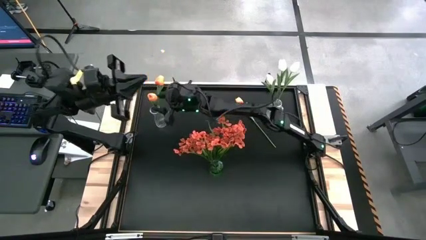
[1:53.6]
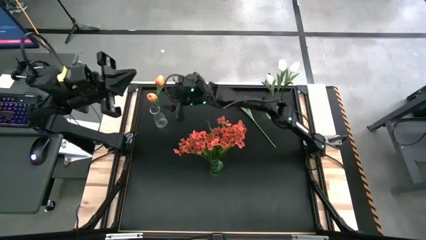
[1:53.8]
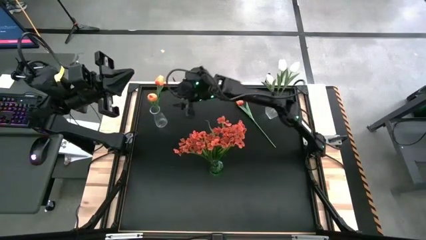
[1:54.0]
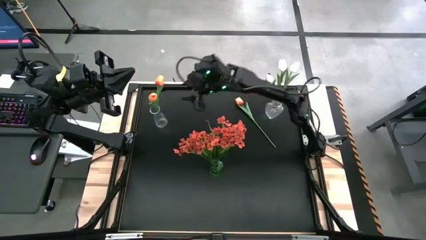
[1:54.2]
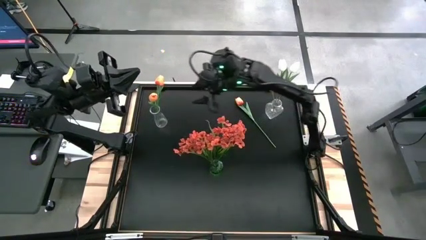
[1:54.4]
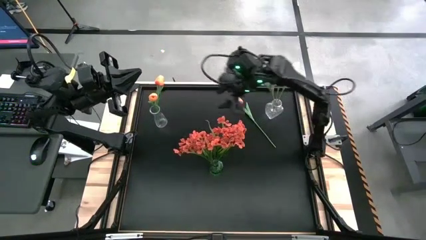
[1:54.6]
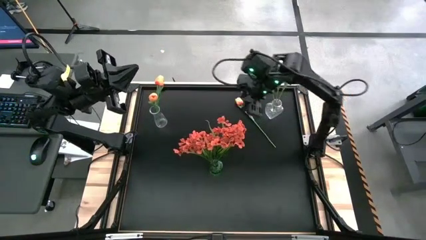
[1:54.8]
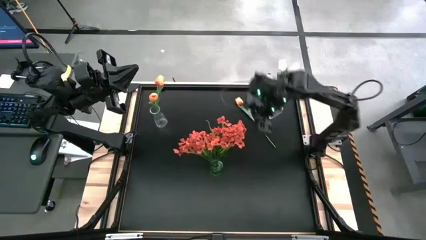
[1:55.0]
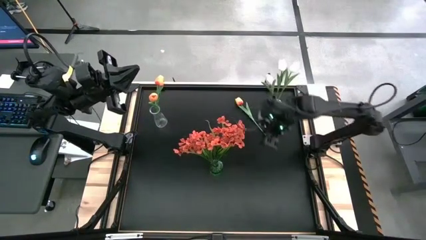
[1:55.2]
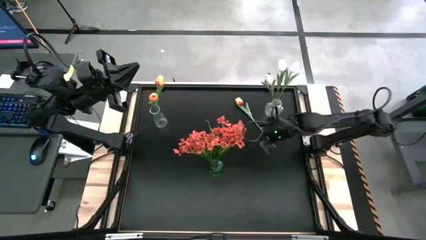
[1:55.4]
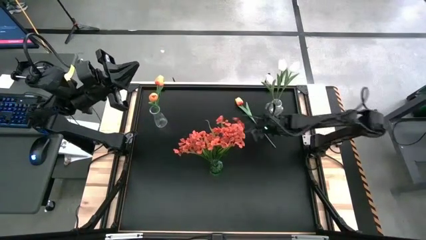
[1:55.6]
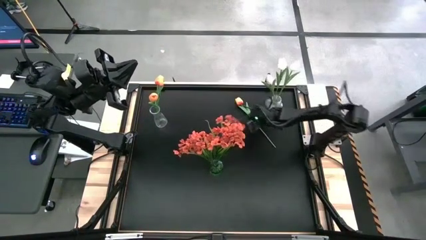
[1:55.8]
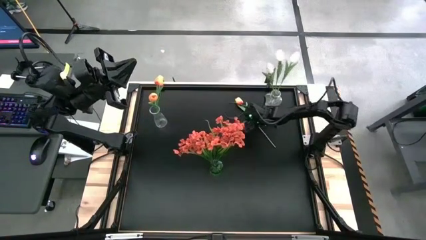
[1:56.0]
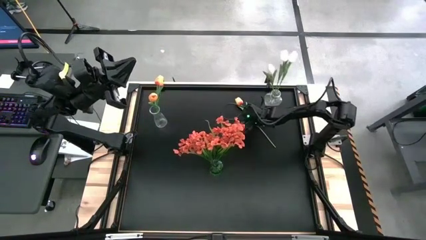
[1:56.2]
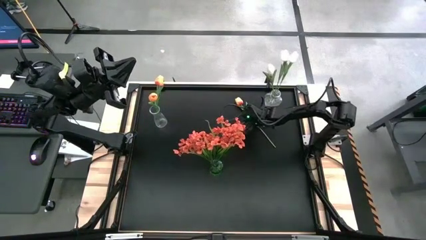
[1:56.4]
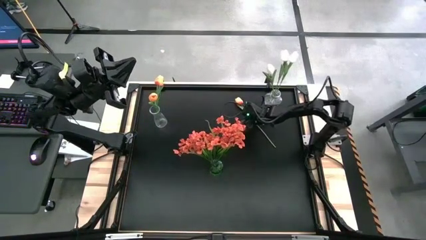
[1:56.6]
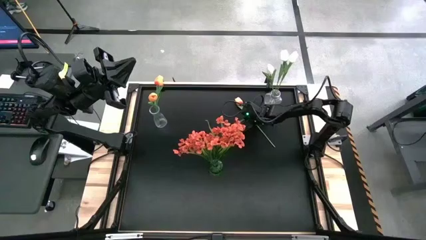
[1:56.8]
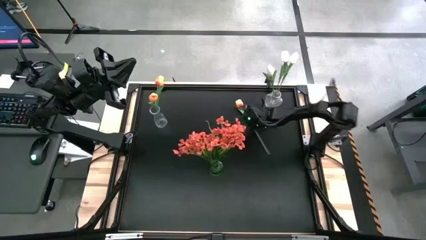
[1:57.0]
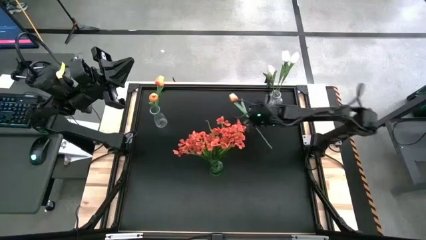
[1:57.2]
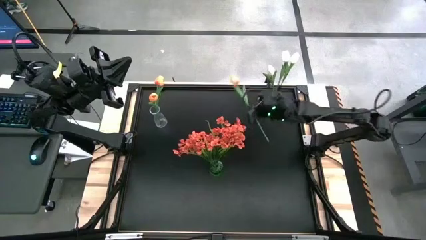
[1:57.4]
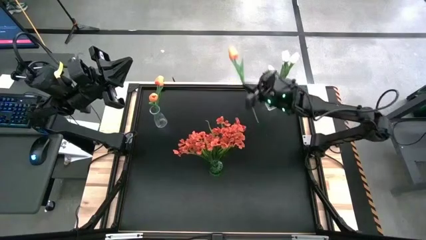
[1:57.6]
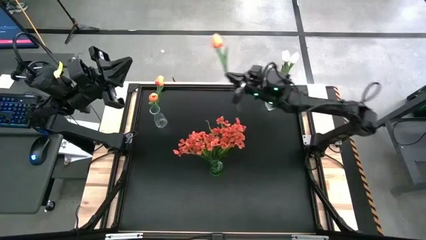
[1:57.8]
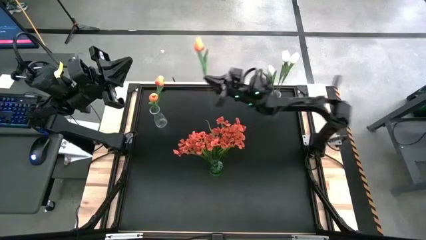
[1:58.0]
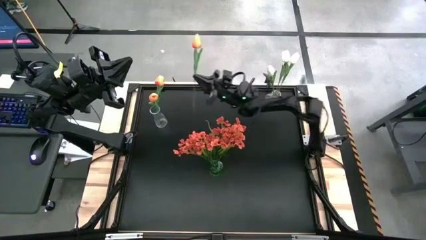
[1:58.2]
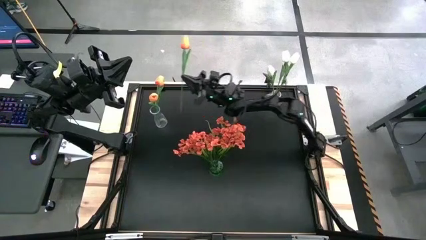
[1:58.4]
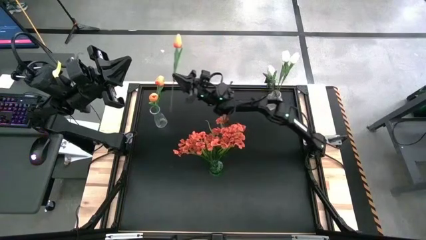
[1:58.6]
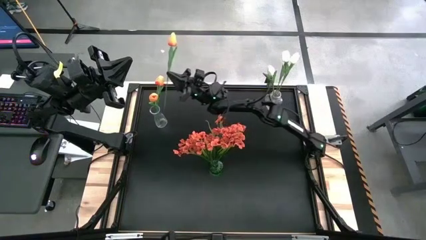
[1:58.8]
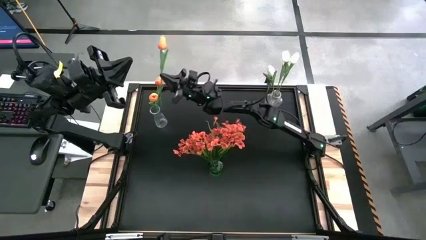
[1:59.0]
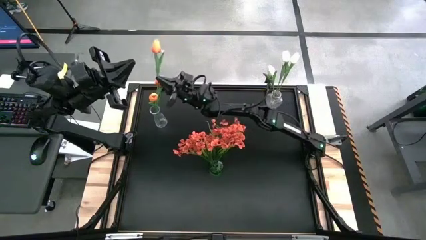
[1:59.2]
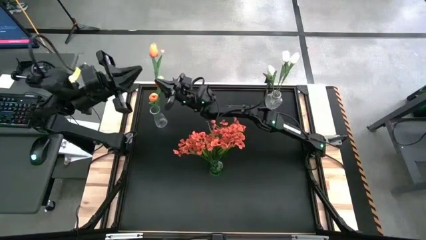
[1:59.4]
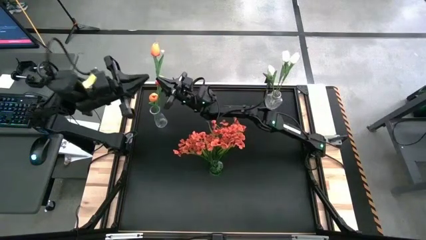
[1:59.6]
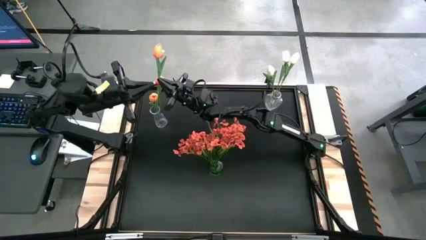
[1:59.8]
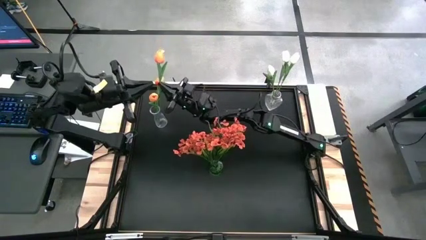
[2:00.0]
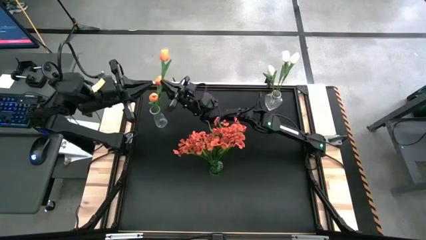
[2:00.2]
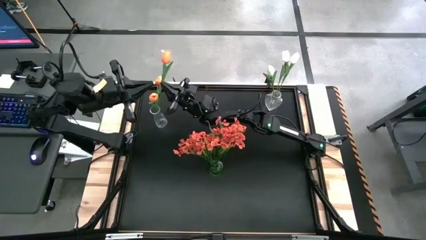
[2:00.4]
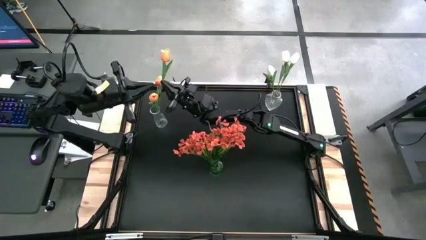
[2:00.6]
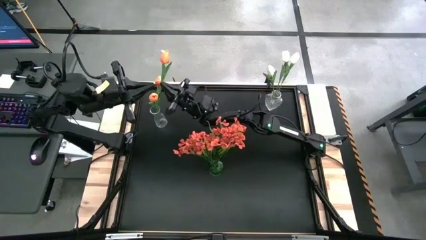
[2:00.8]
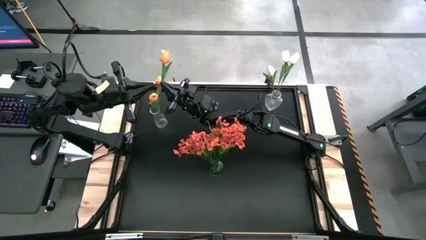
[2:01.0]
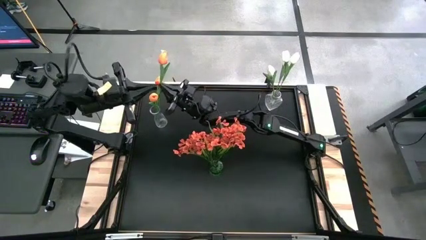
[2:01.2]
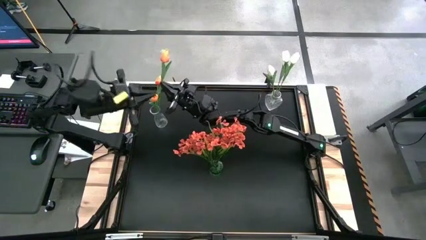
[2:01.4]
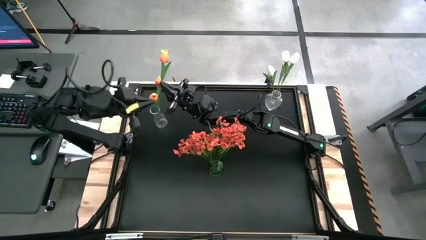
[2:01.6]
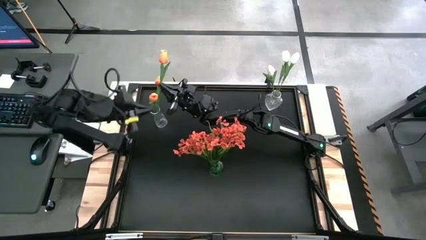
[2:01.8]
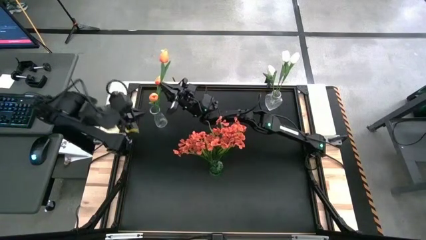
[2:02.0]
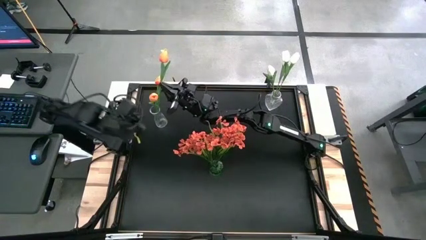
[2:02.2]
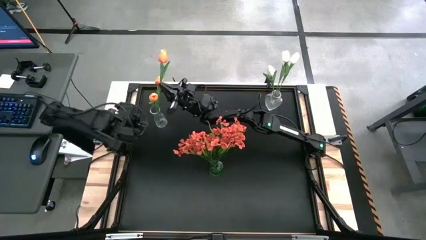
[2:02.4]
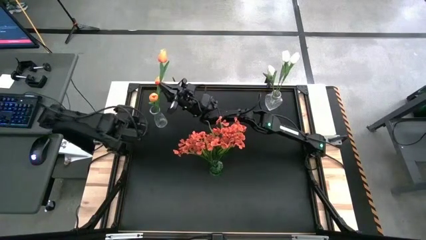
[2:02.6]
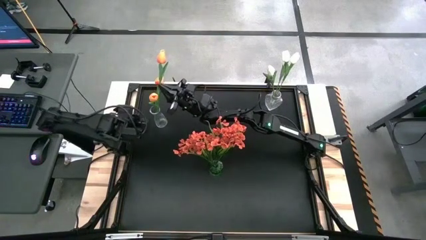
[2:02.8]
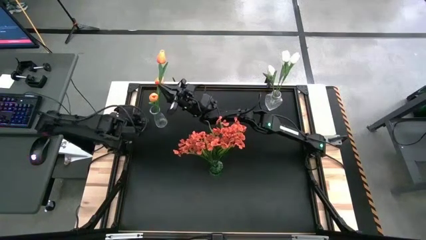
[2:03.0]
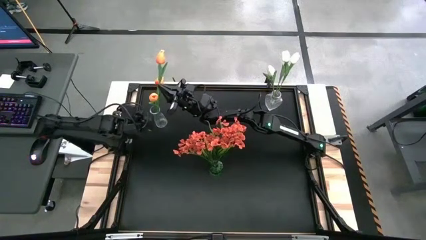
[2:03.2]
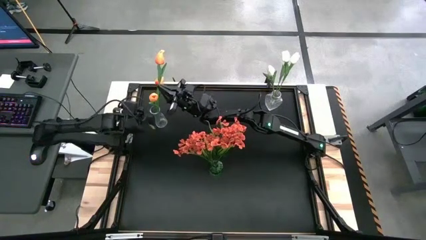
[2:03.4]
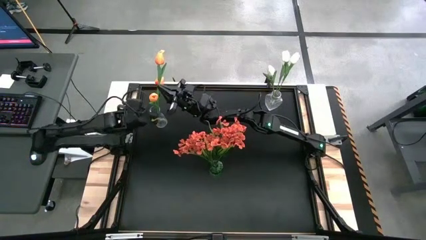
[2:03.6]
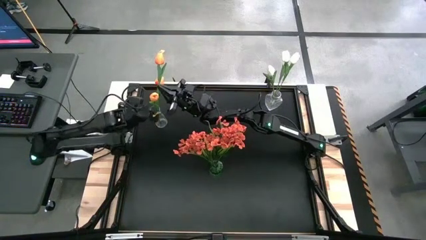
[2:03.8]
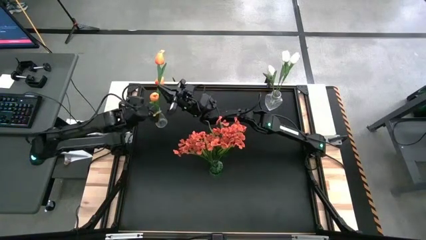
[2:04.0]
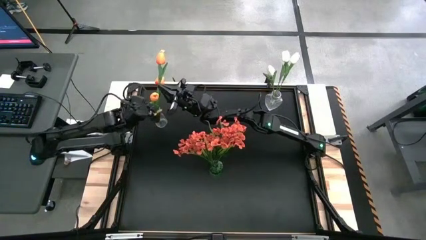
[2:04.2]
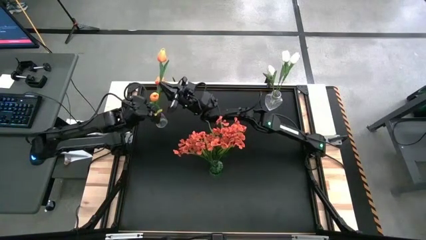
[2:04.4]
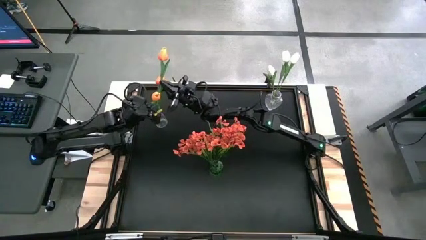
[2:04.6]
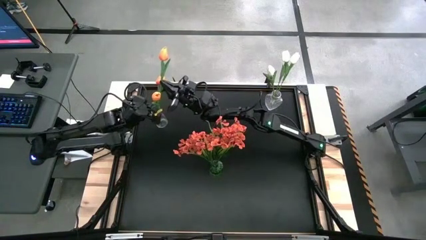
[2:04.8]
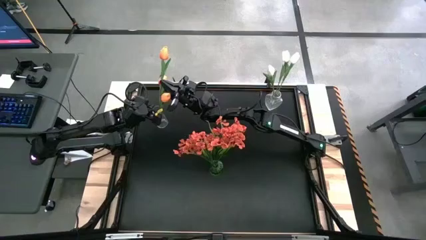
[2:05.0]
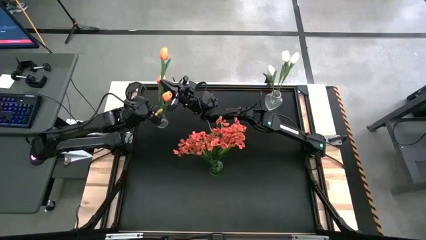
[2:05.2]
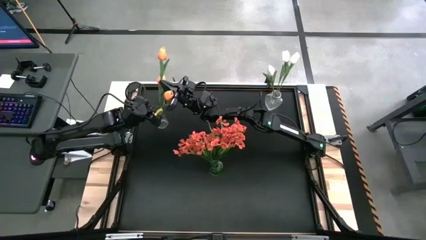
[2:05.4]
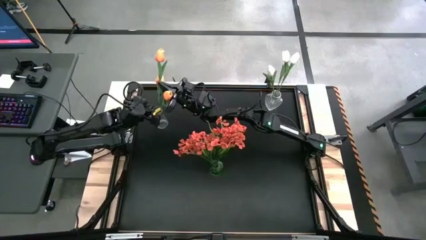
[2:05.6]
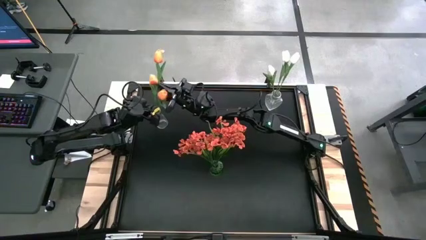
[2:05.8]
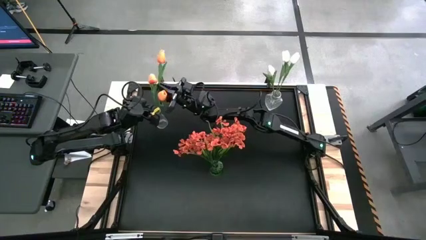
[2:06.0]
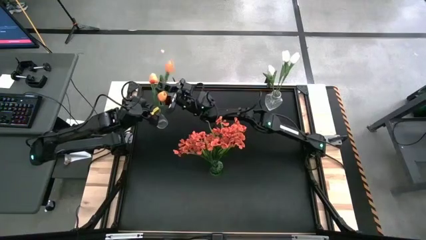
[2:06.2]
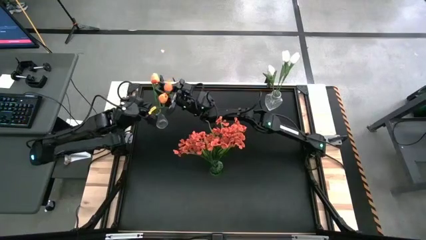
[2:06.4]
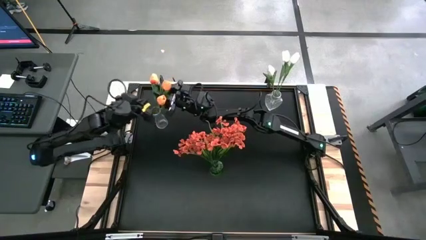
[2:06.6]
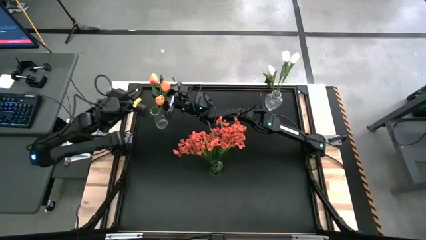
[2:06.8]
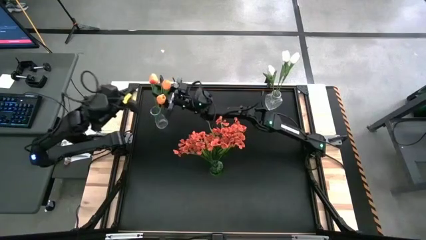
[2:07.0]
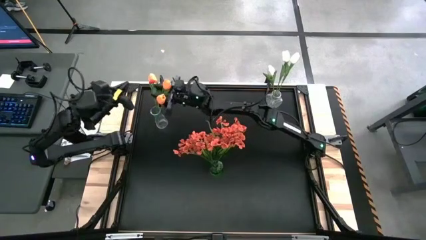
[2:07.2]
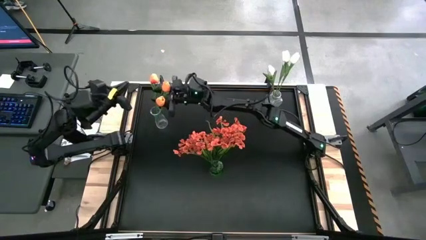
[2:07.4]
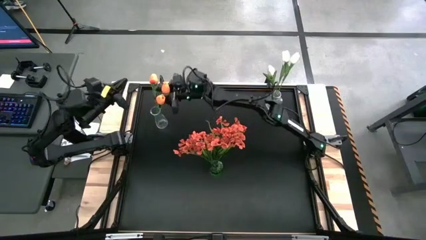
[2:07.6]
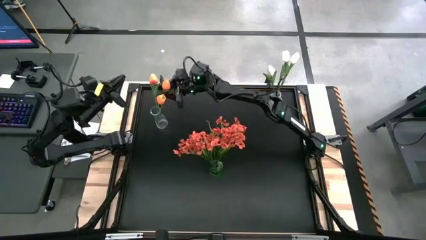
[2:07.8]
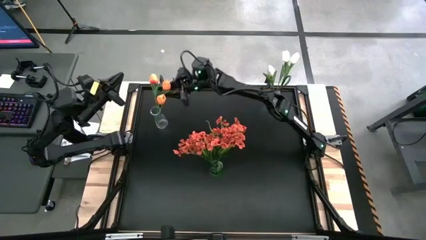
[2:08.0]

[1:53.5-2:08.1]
Task: Sort flowers into vase by color
Put the light orange flower into the left transparent vase

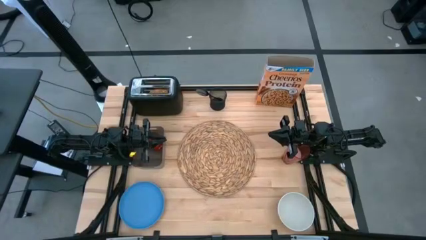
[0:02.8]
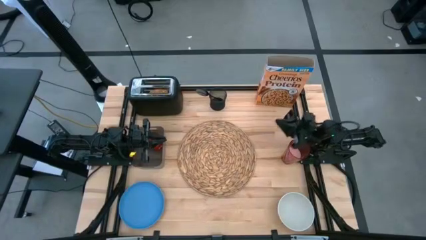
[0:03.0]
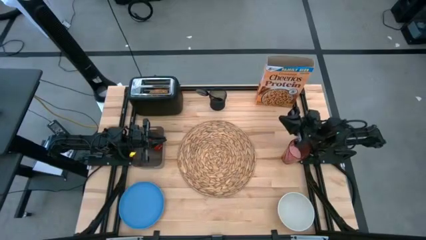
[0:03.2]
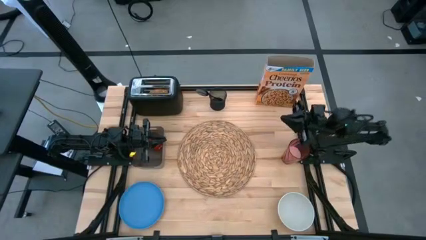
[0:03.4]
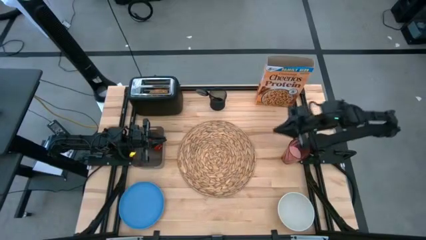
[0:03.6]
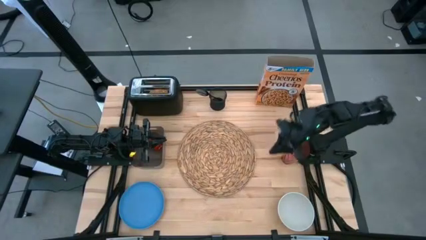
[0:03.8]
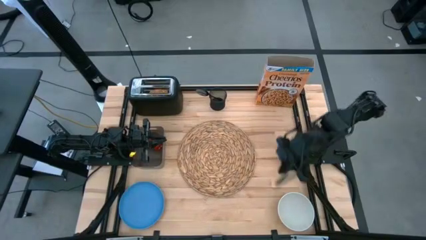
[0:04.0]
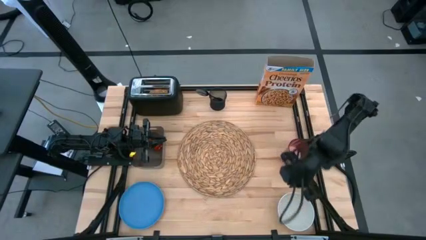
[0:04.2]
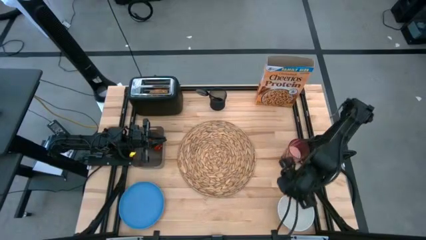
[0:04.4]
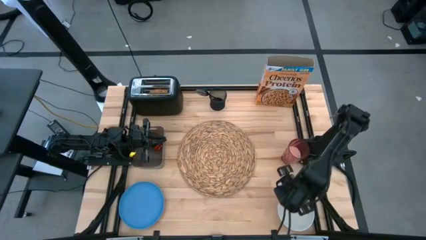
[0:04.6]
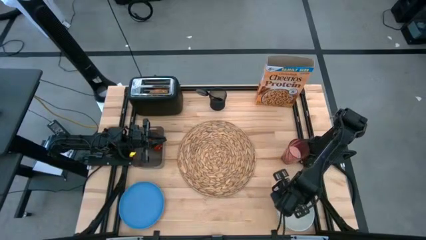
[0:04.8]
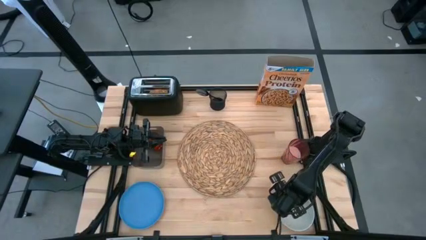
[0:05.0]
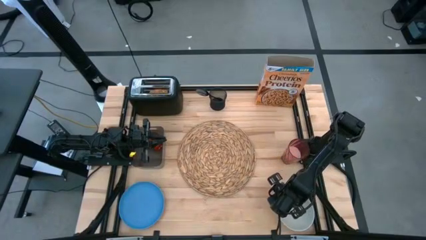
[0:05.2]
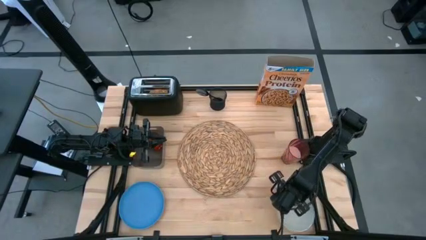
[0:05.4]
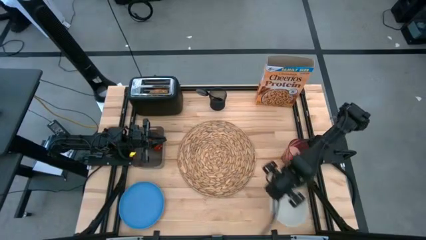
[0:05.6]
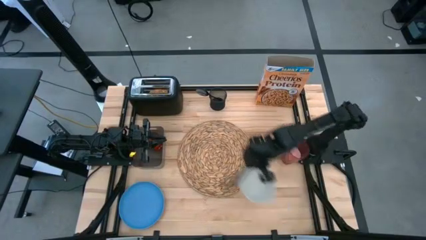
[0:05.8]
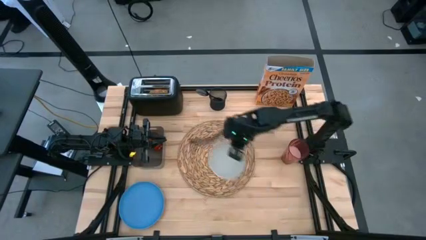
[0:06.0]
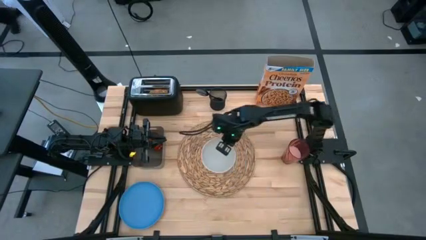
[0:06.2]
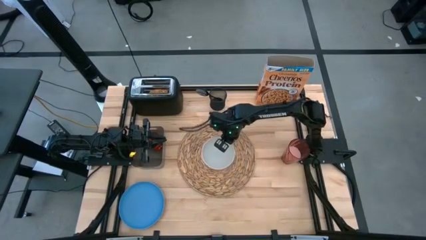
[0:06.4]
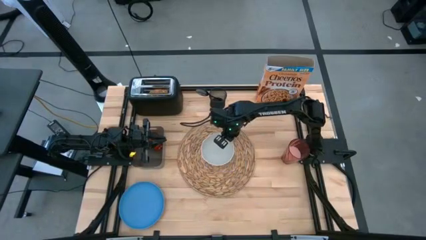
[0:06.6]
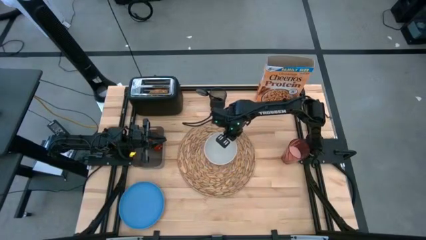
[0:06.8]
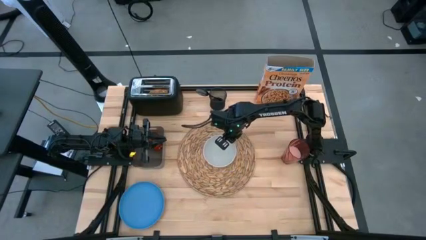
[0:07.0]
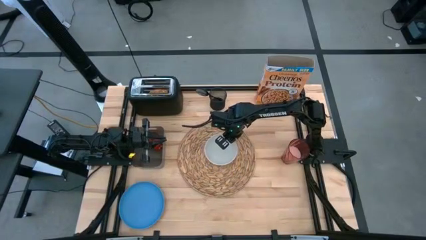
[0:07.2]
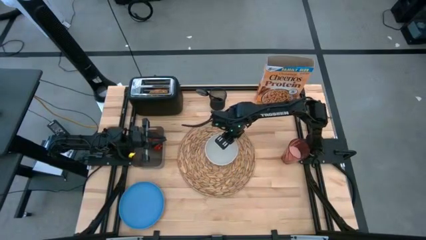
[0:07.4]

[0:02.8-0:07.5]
Task: Arrange a breakfast setting
Put the white bowl on the brown woven mat
